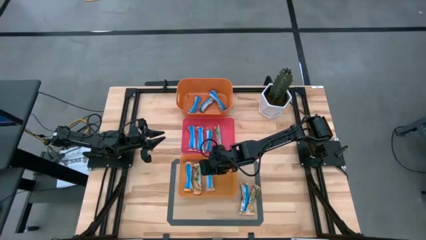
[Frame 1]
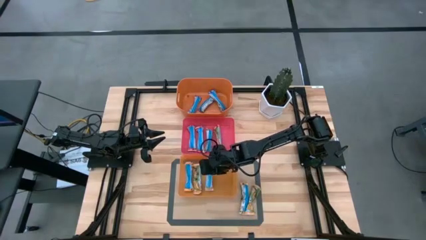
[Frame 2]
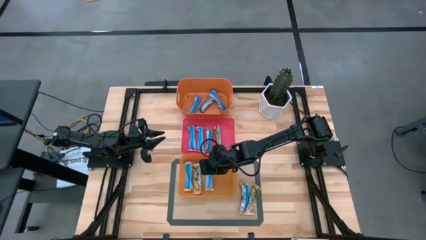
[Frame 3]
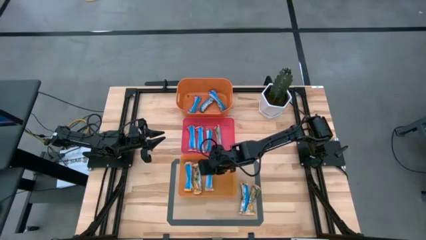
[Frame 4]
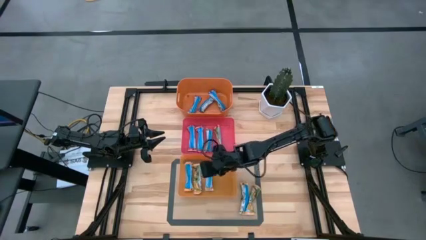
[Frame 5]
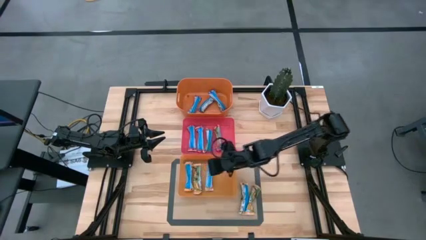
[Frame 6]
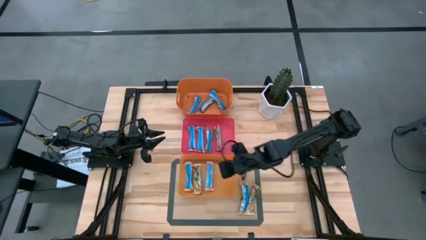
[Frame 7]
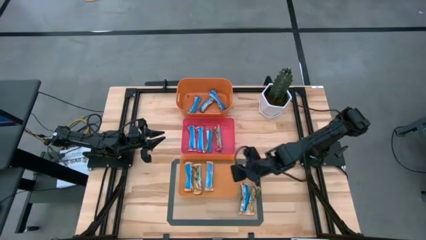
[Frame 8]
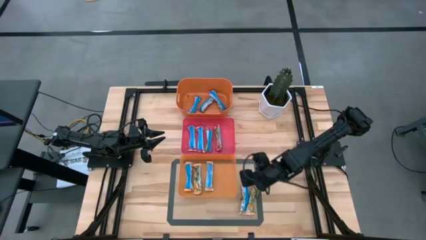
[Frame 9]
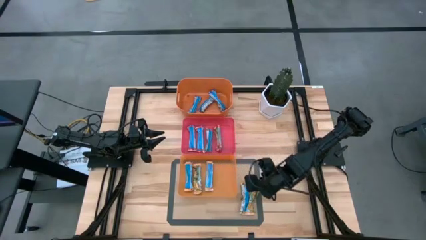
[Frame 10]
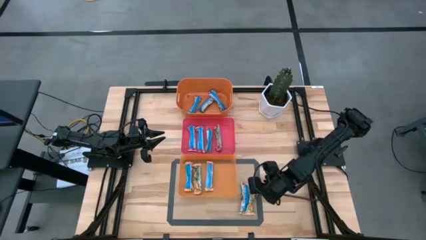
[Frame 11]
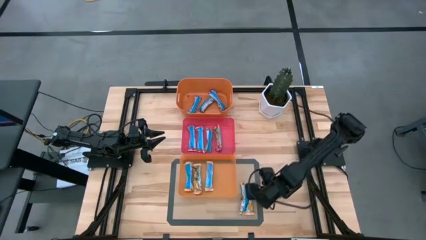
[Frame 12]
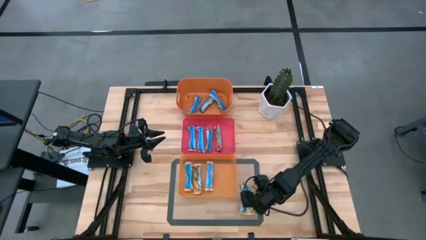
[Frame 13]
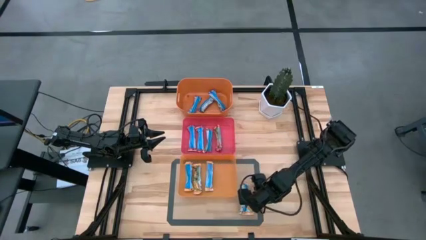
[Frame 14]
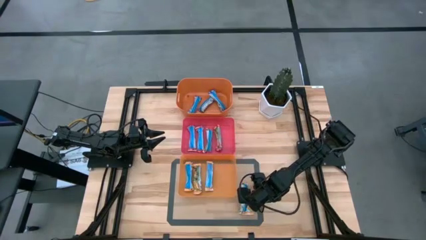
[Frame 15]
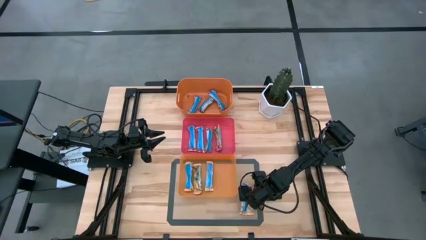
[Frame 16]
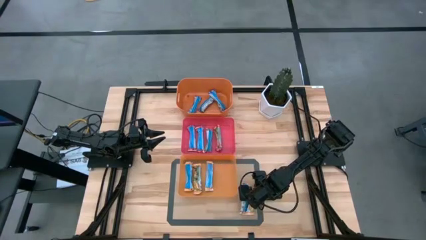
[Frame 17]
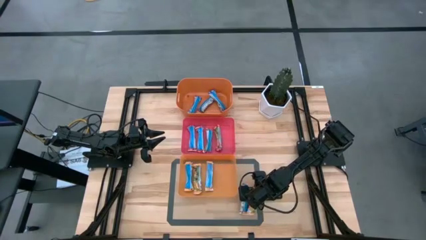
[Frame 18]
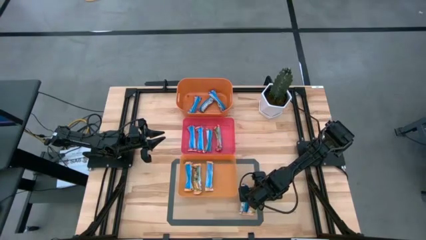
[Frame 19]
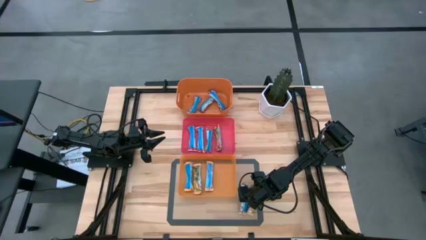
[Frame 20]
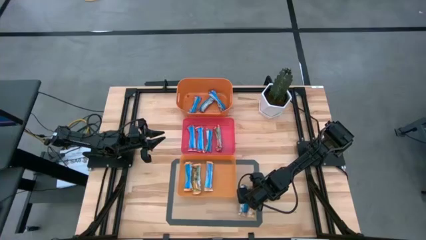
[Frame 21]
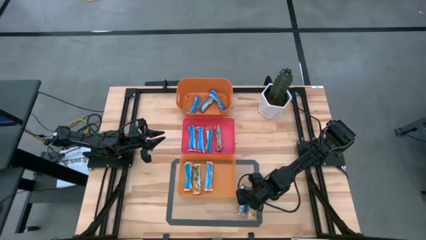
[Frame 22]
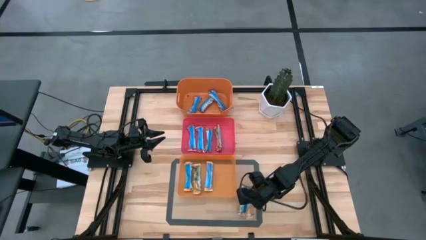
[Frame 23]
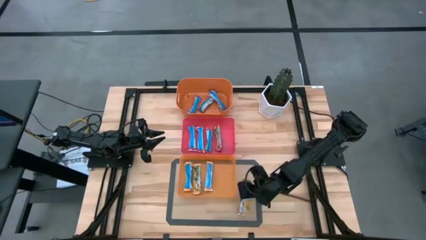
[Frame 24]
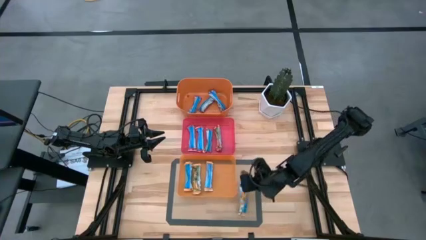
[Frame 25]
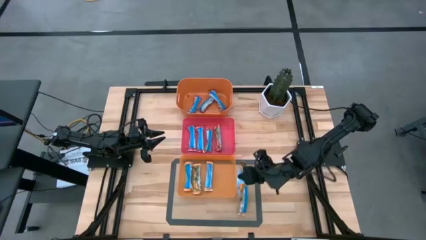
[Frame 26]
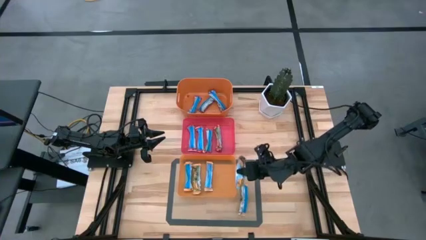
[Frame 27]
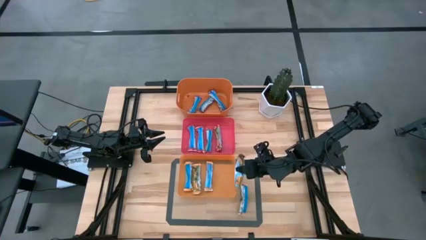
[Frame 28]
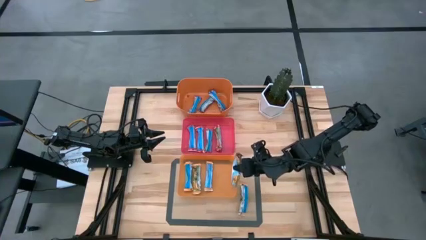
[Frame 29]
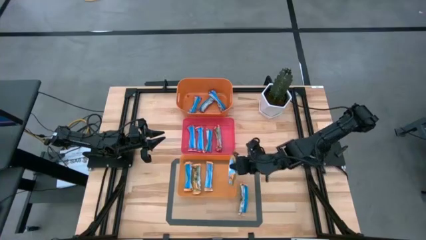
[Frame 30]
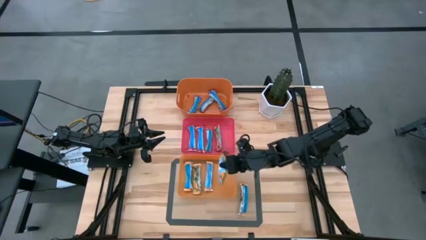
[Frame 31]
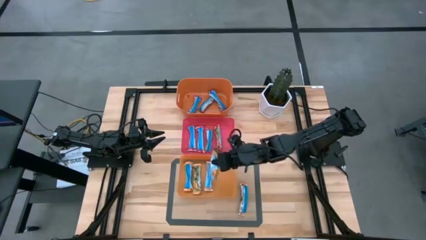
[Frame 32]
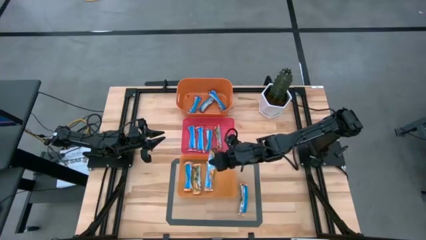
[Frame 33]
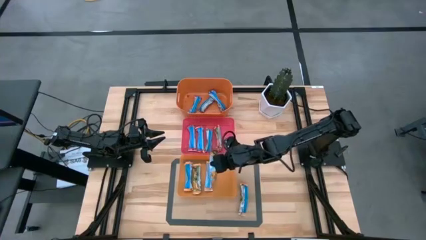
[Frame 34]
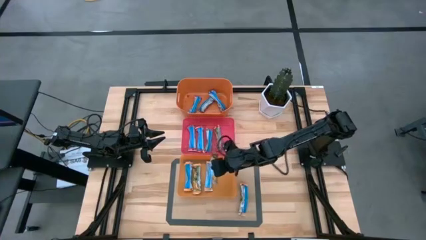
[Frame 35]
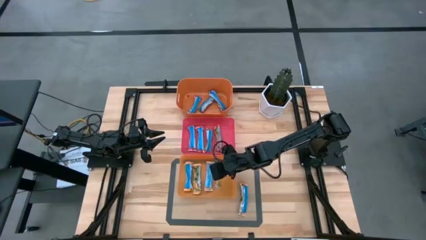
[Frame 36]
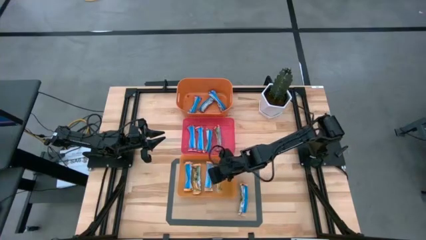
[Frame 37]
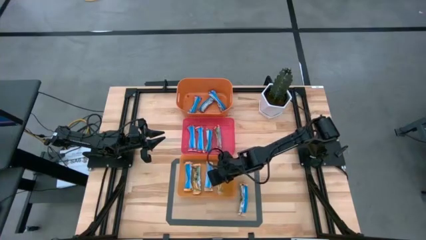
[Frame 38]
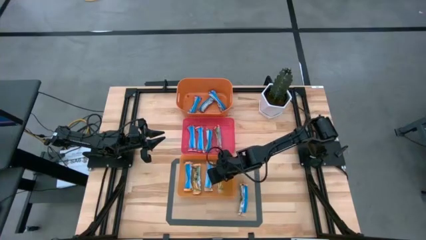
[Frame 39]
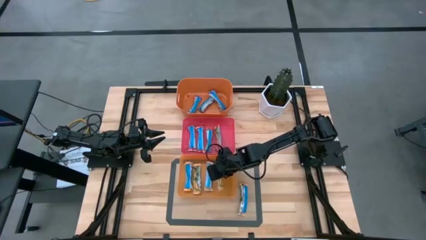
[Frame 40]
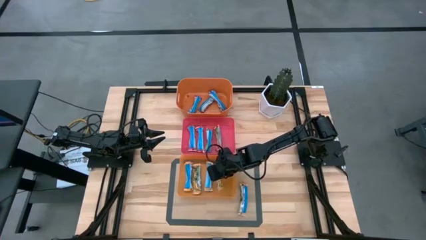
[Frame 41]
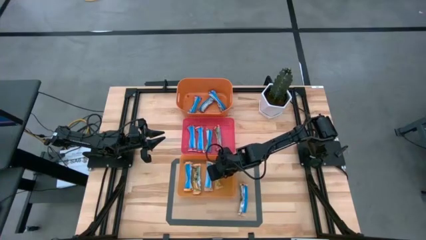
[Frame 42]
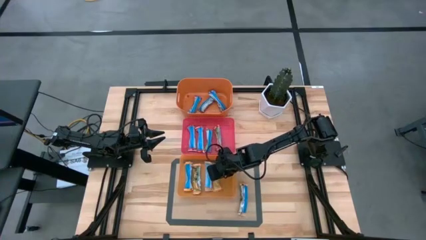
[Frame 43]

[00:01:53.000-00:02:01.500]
Task: Pick and place Granola Bars by type
Put the yellow granola bar into the bottom orange bin

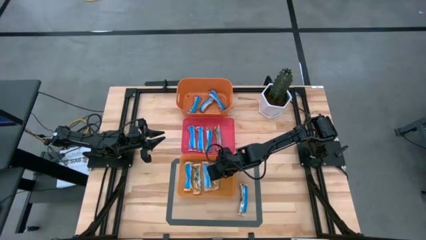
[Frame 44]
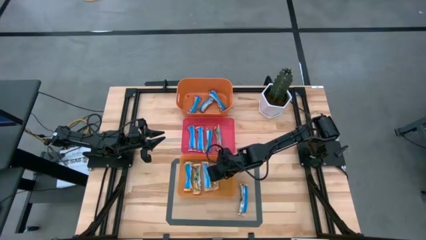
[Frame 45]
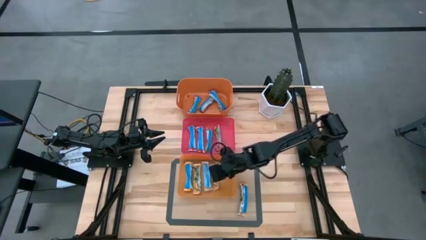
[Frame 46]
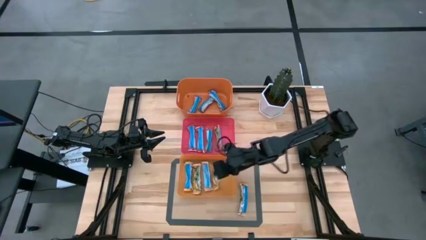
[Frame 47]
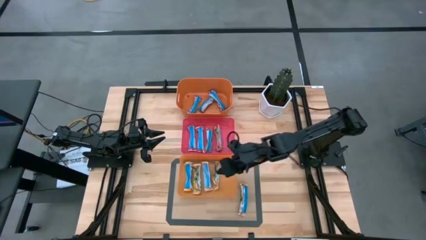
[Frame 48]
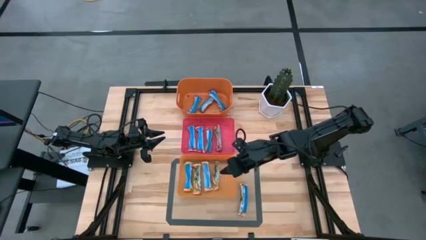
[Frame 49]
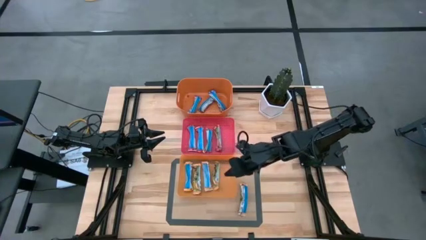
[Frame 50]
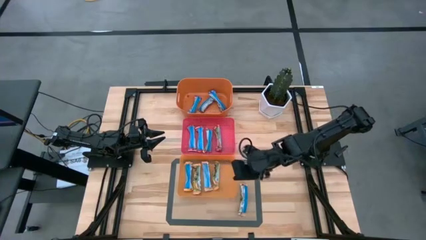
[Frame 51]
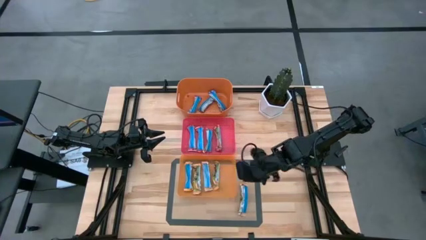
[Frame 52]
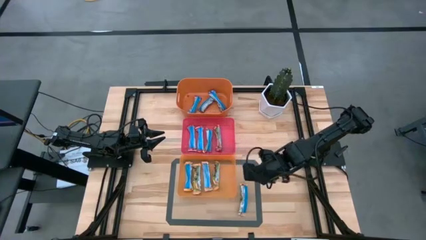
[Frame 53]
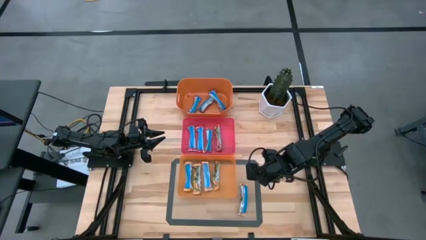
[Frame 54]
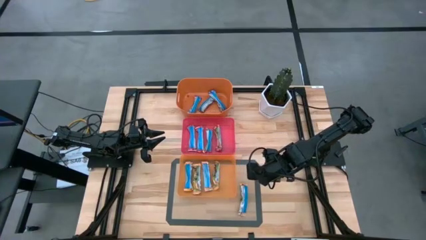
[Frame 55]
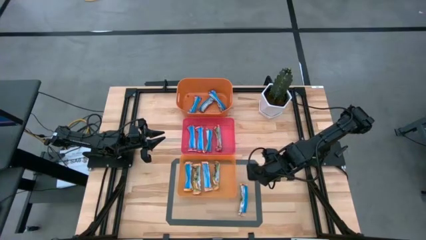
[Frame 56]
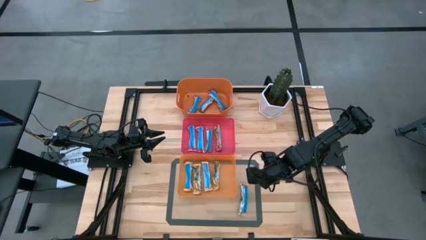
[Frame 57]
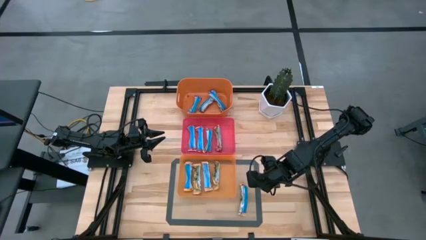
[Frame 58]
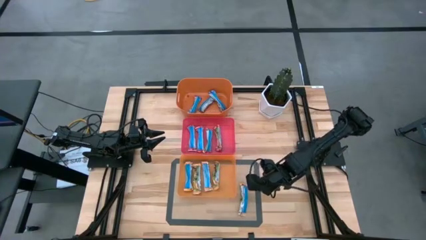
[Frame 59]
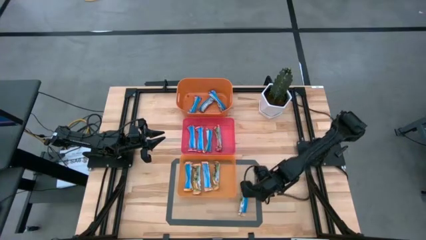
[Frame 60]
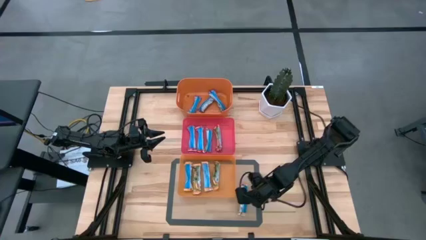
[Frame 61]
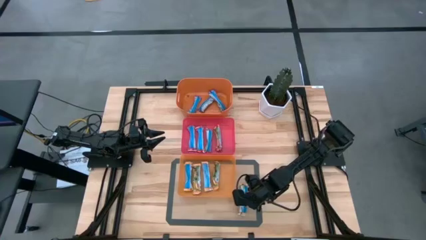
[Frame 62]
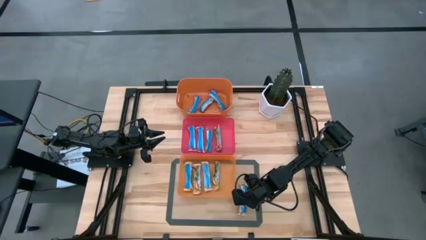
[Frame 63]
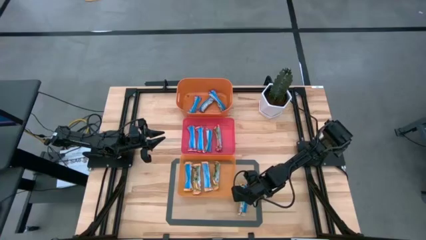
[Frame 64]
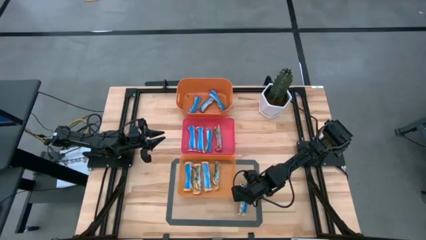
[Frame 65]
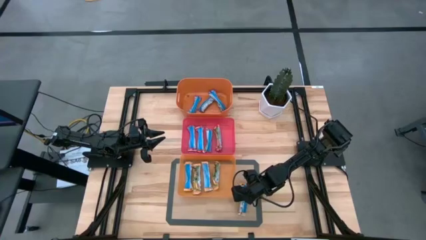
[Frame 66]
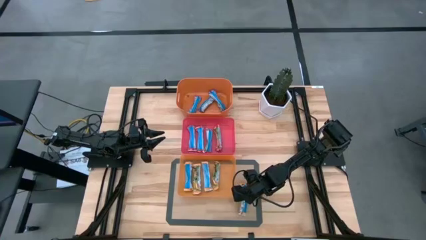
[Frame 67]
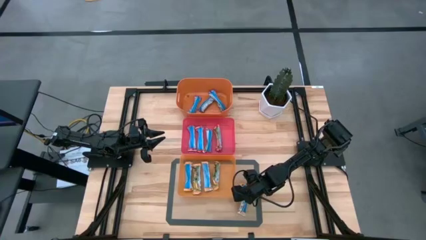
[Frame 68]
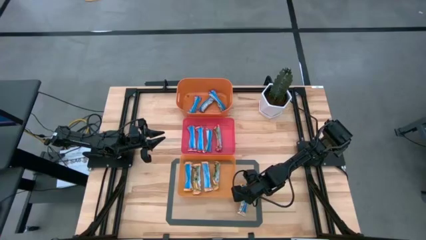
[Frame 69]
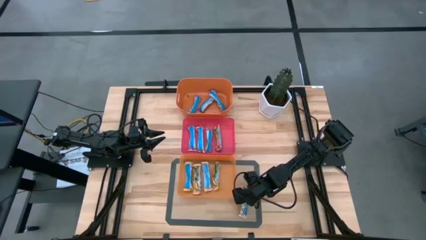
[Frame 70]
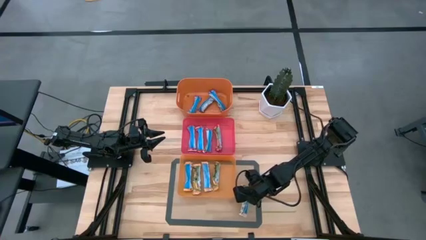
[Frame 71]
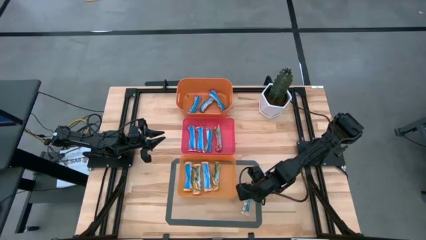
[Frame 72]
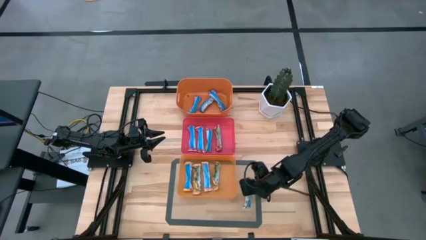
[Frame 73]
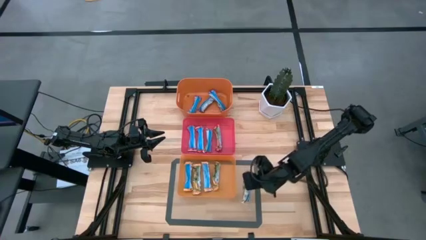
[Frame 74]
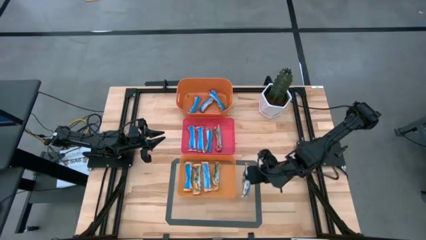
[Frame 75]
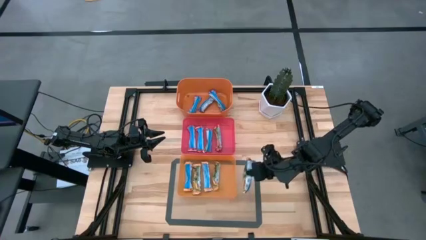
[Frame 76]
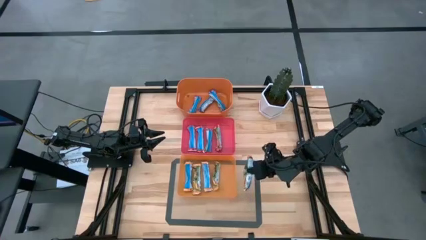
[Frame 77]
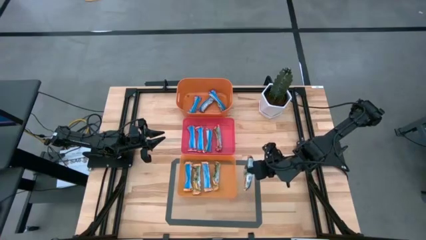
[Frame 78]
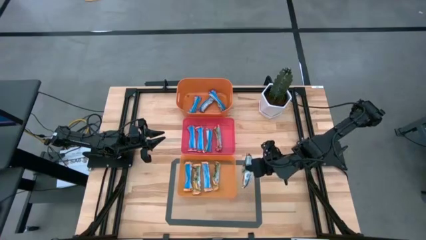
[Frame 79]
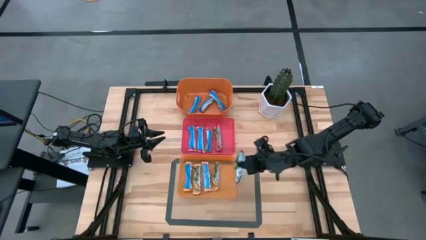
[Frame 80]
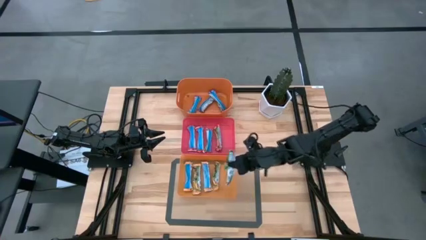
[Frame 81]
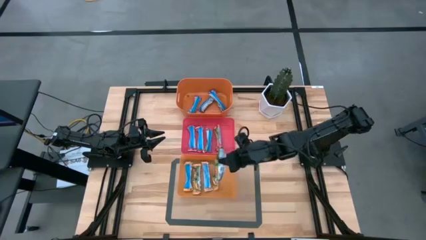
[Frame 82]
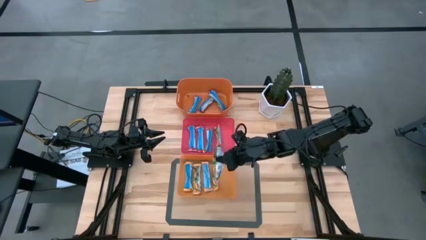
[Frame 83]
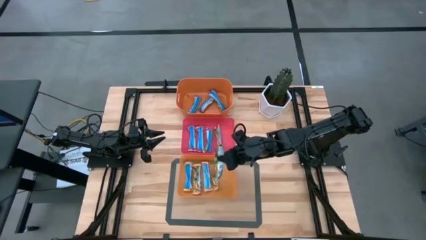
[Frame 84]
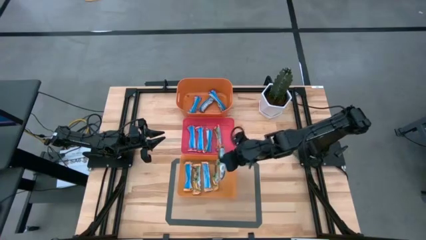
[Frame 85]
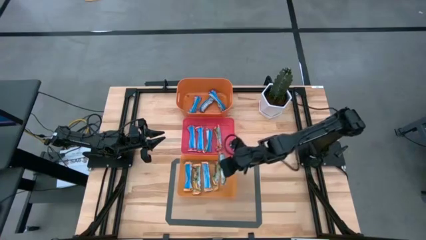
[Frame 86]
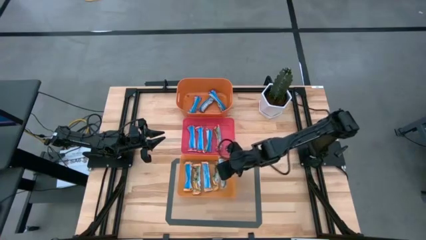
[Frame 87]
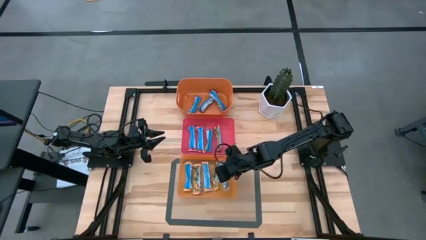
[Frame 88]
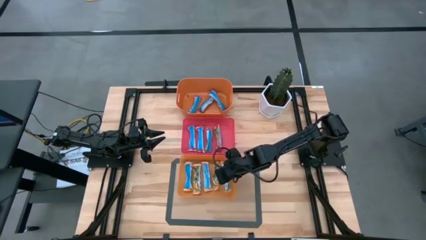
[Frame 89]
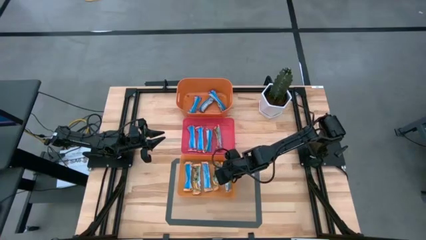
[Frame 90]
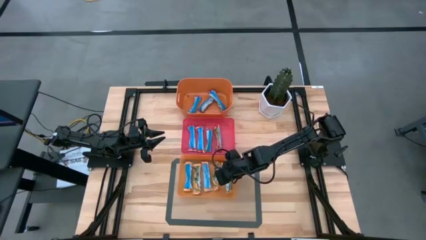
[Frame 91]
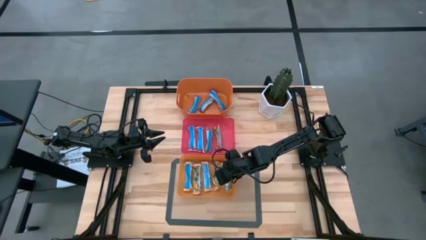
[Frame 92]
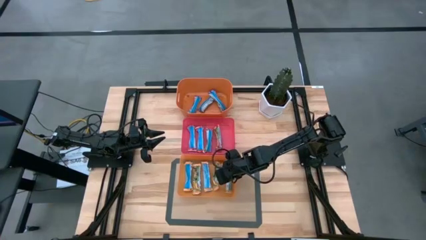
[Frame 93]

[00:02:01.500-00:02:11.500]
Put the yellow granola bar into the bottom orange bin
